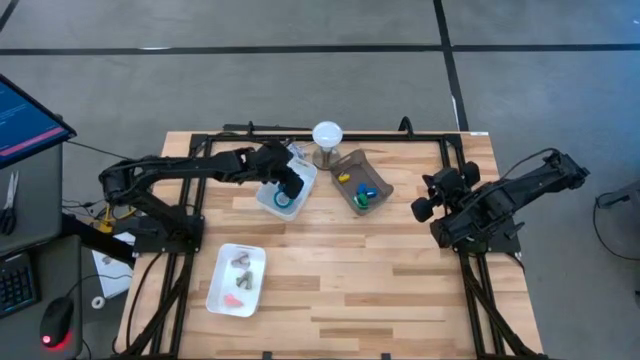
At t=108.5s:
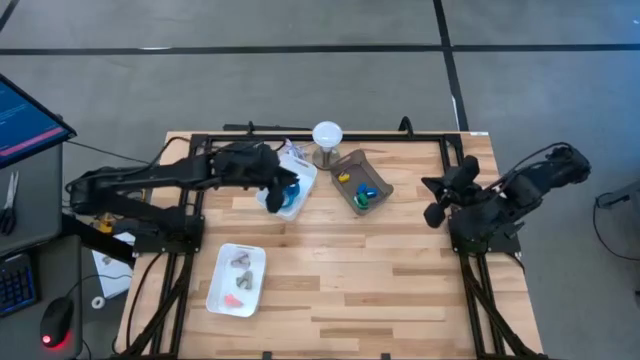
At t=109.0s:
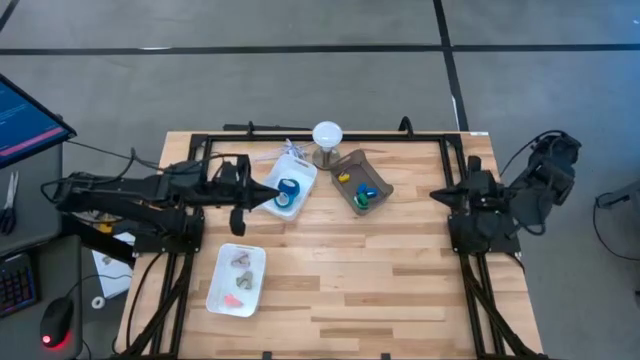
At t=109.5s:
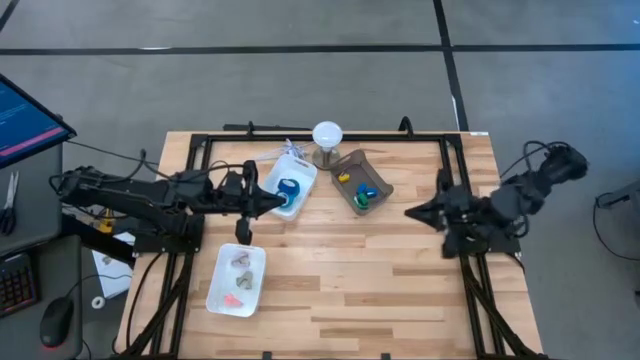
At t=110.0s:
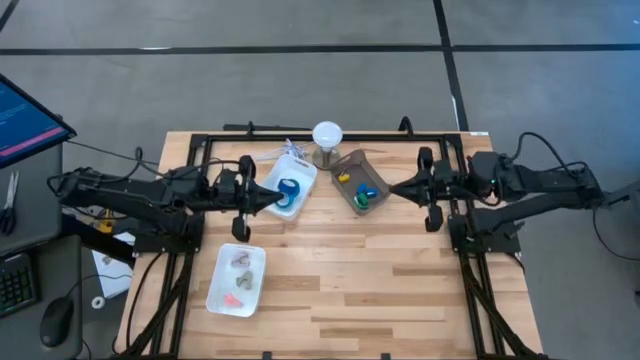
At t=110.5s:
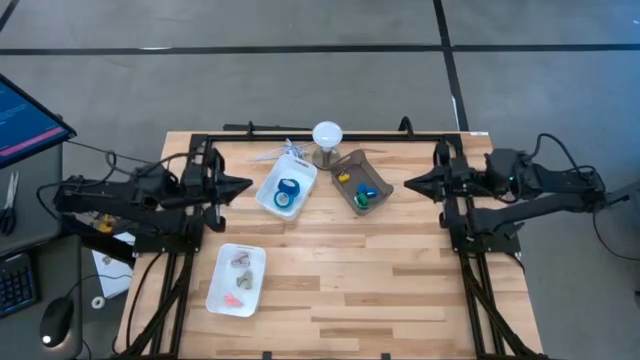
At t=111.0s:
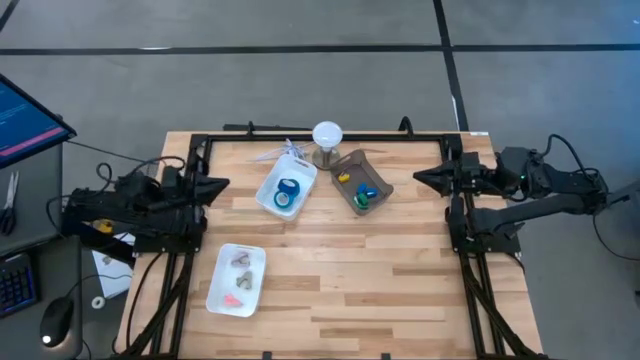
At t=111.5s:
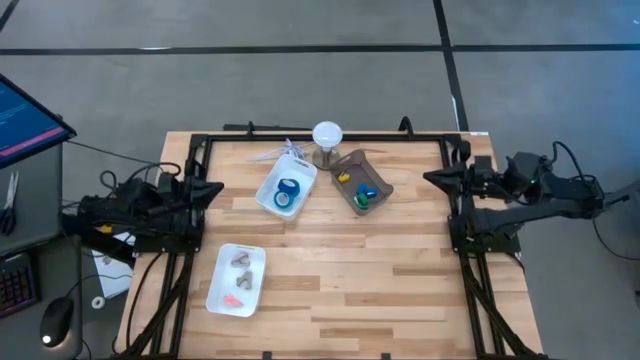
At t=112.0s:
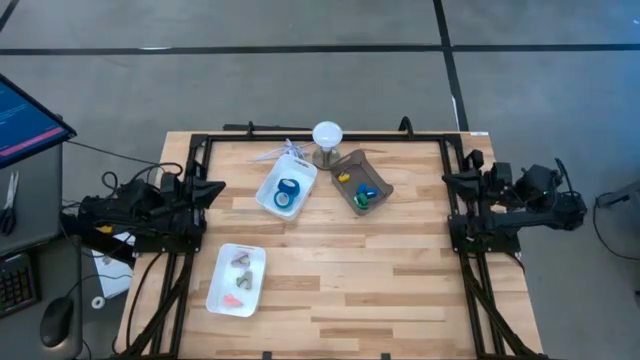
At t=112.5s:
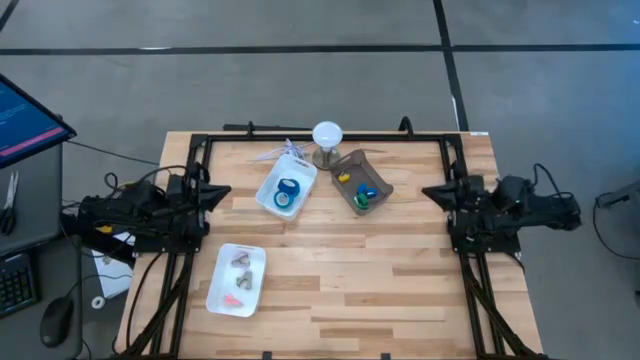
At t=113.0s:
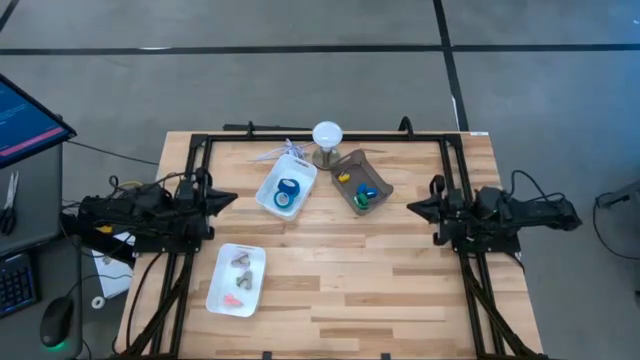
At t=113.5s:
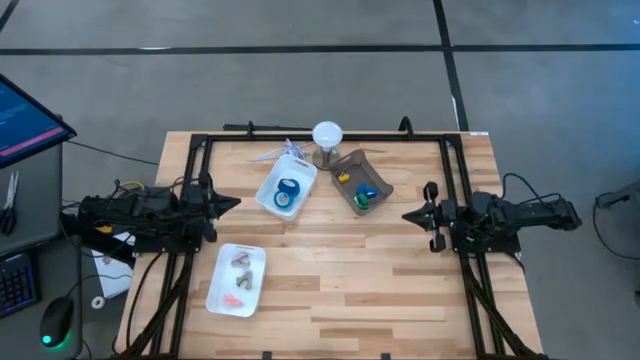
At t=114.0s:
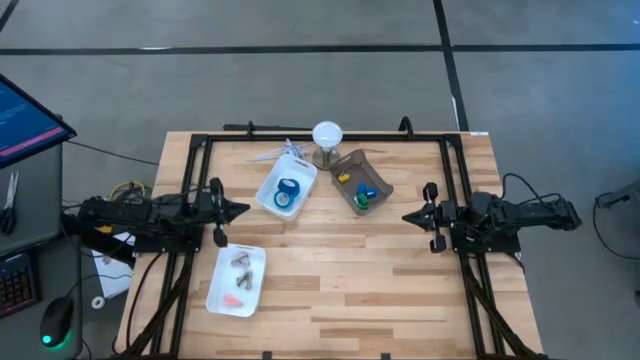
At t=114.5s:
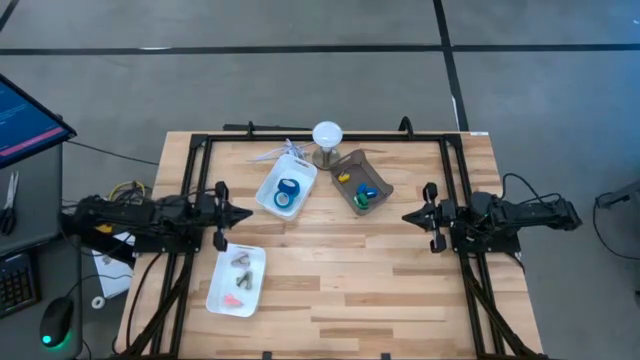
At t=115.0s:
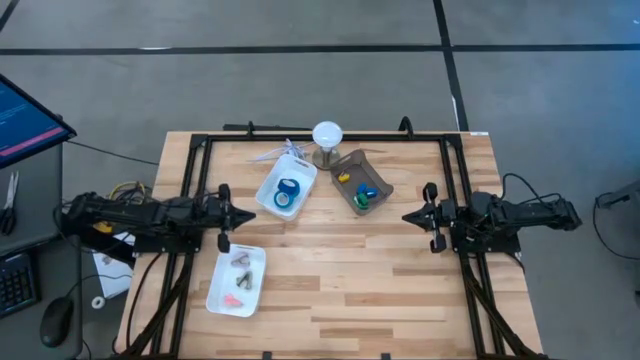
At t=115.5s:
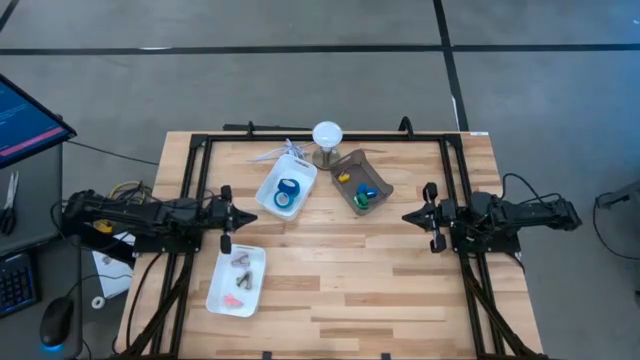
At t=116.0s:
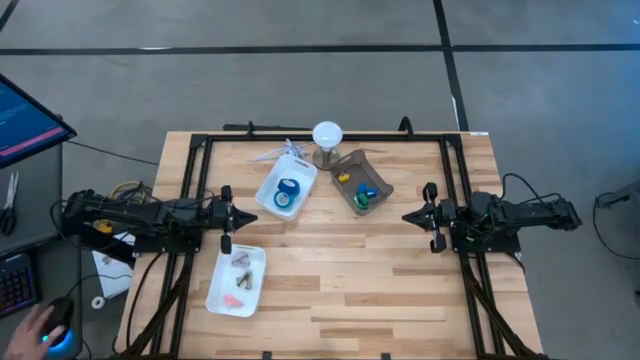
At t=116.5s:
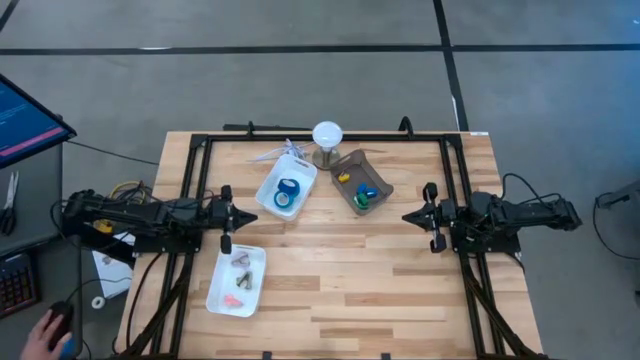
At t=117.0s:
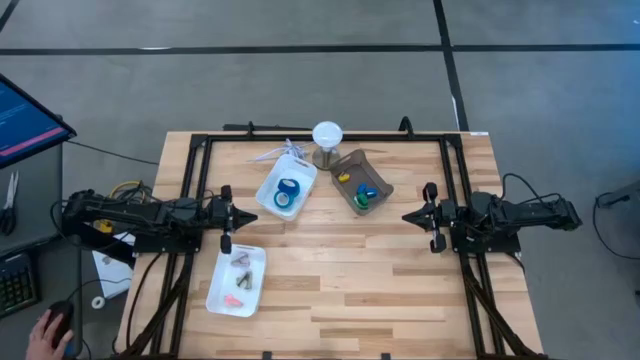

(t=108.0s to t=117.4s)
Task: Pick and place Stapler, Stapler remover, tape
Return to Home Position

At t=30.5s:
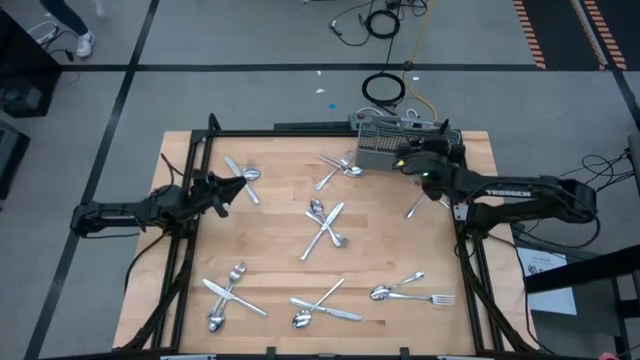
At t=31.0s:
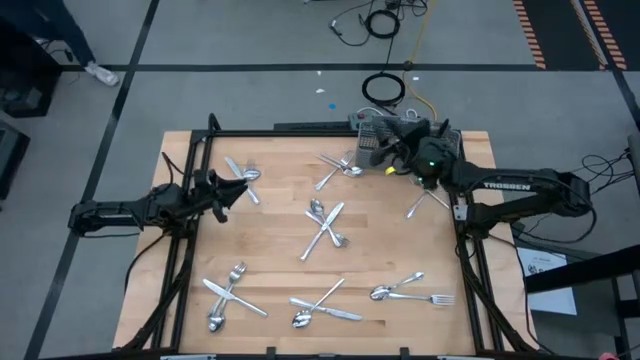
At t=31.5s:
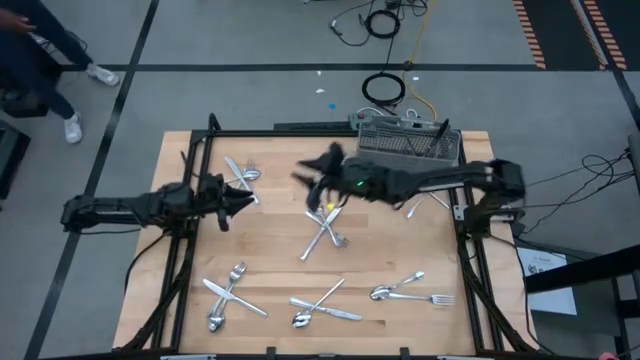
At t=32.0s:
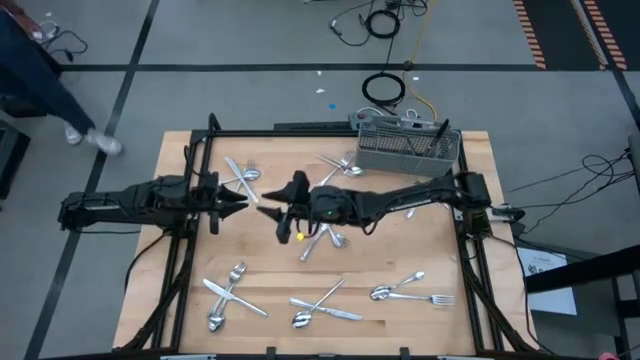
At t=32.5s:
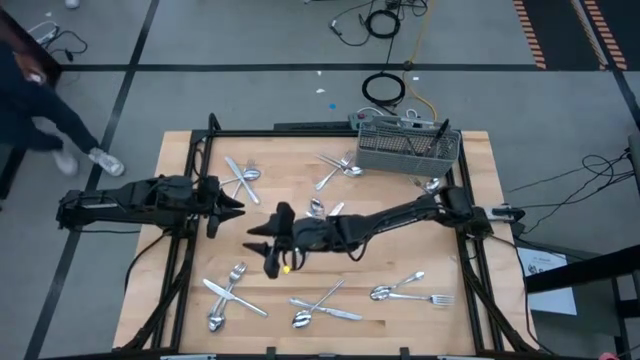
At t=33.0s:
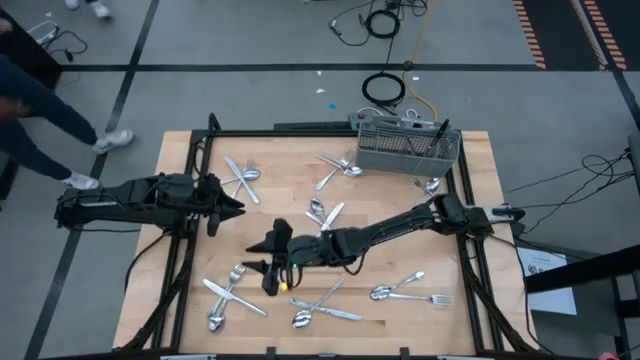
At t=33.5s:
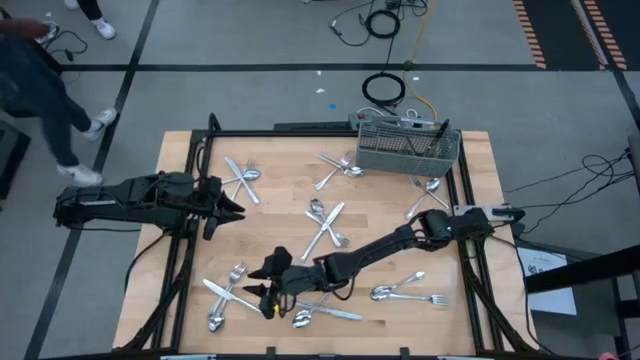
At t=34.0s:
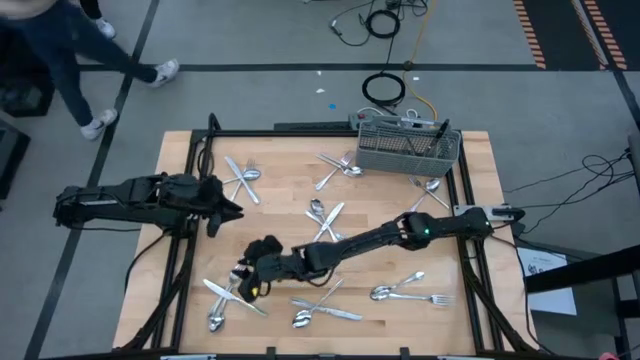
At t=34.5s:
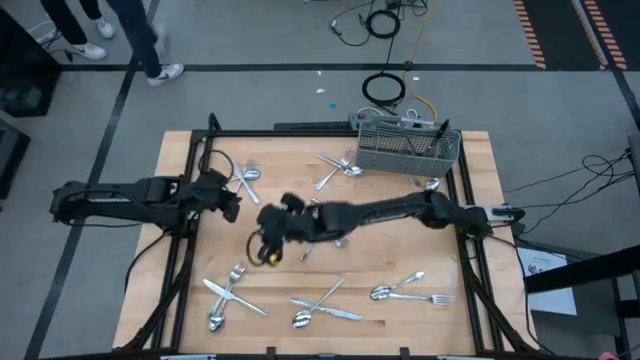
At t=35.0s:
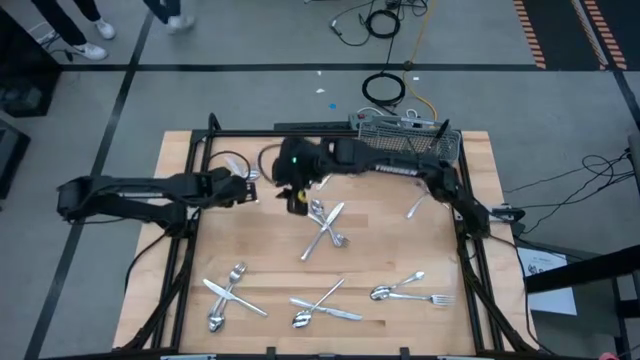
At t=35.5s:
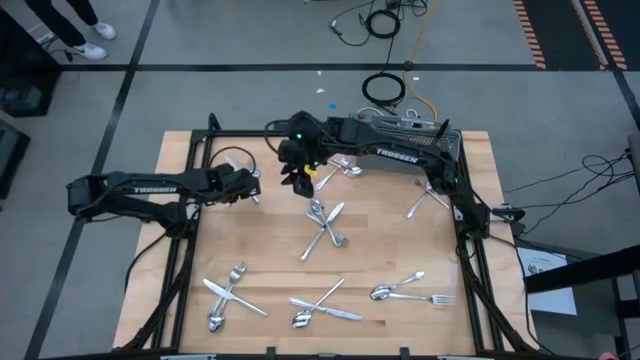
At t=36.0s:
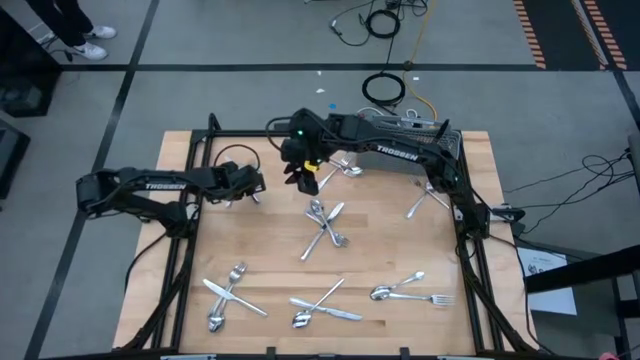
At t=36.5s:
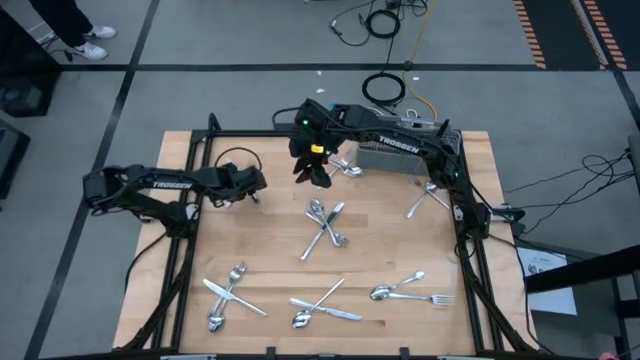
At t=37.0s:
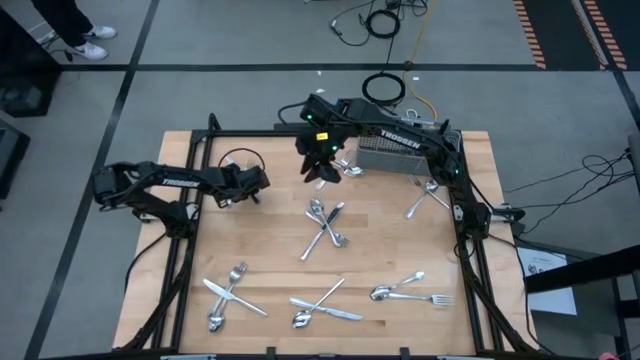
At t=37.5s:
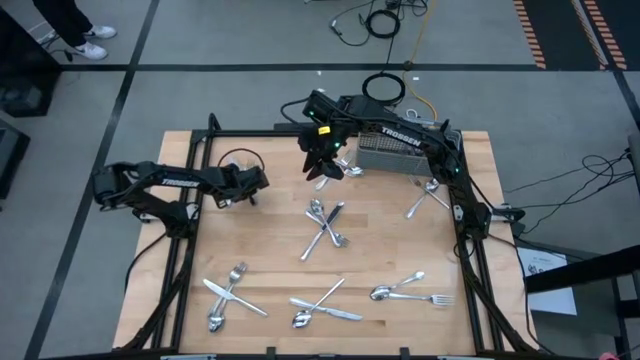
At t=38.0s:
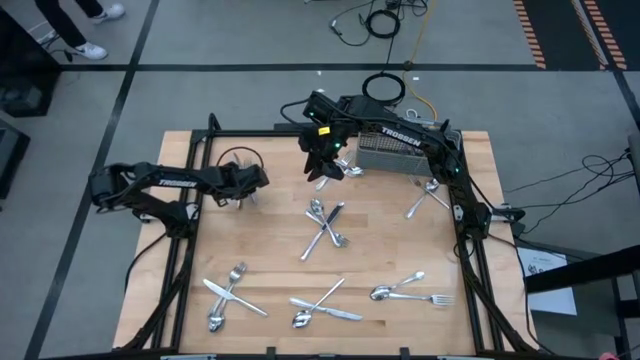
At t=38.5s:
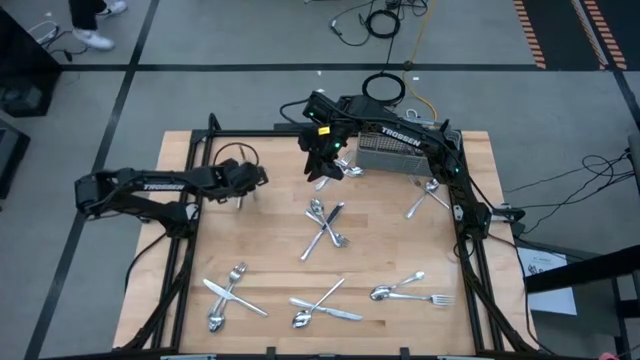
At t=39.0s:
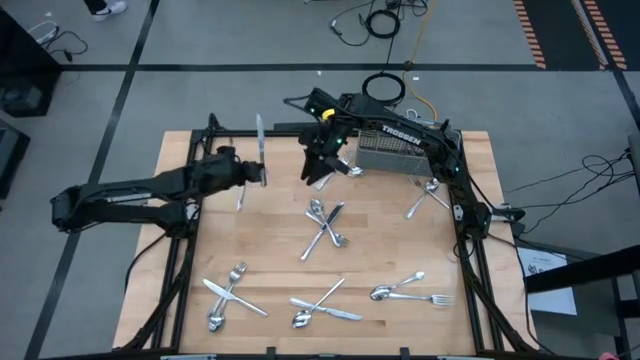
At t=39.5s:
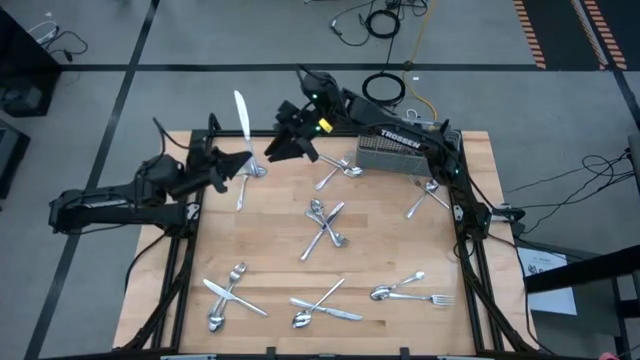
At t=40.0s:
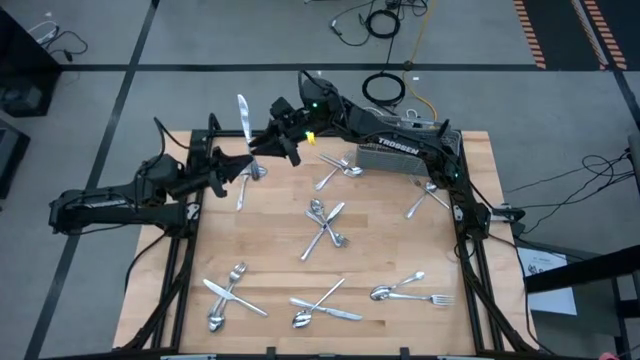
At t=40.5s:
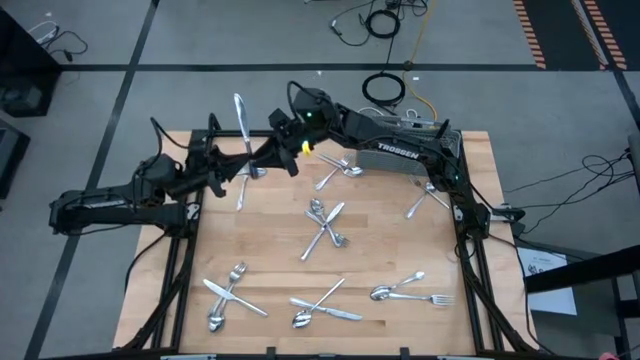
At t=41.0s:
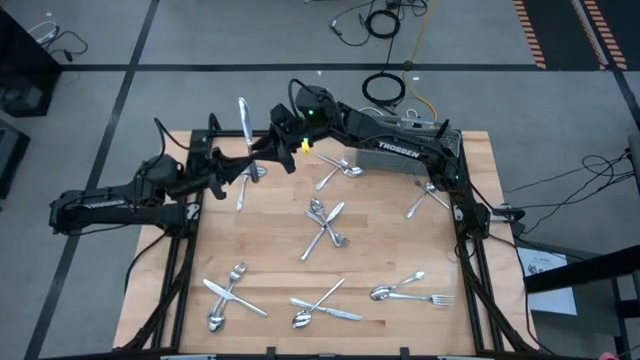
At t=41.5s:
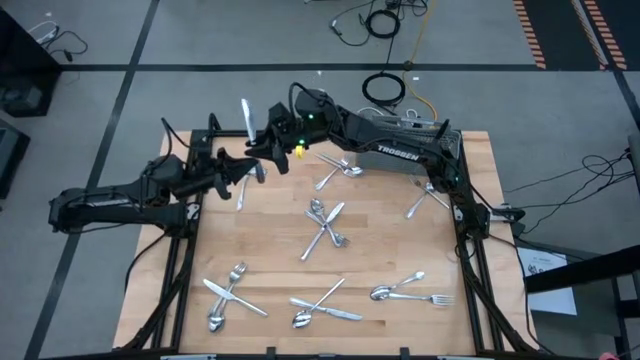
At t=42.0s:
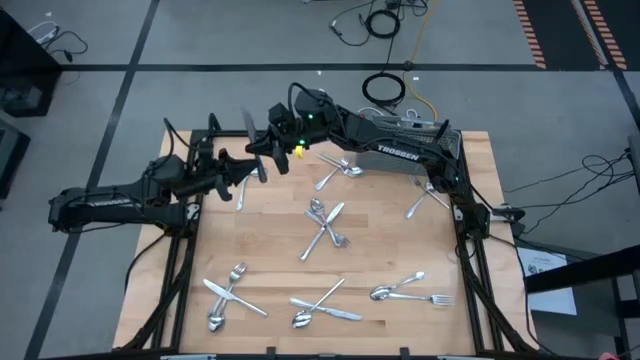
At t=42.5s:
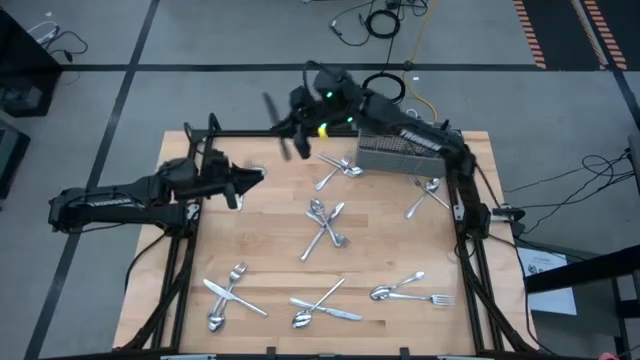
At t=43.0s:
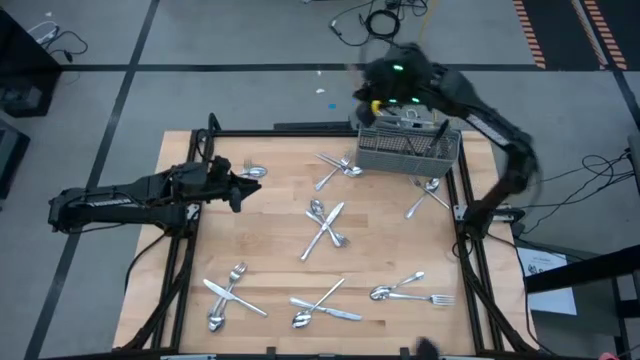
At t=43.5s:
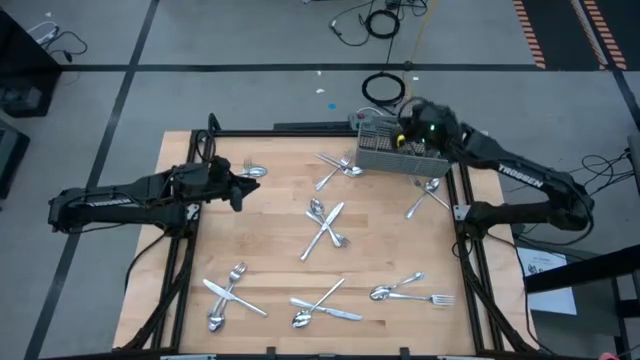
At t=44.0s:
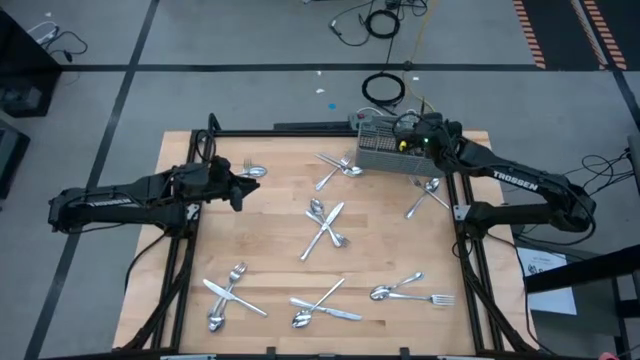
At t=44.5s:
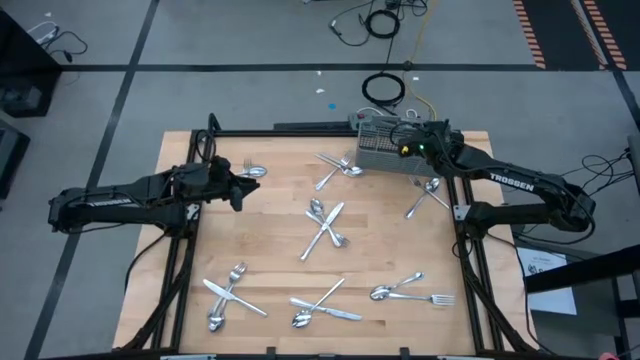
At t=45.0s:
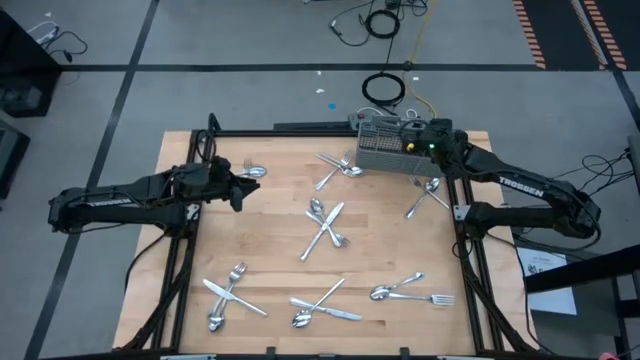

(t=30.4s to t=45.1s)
Task: Sort silverware
Put the silver table knife into the gray utensil holder
